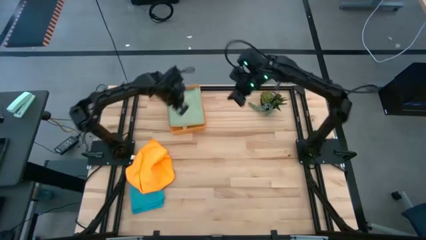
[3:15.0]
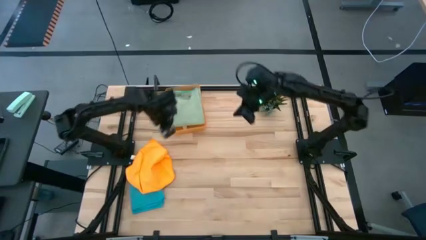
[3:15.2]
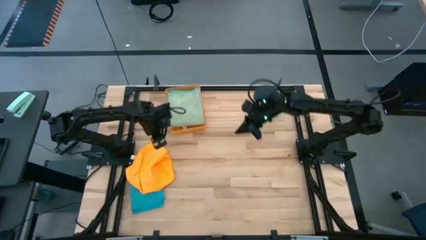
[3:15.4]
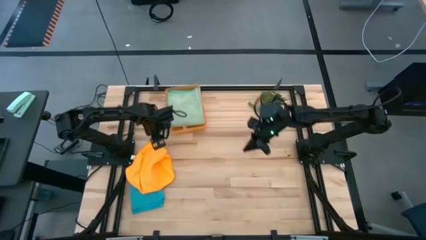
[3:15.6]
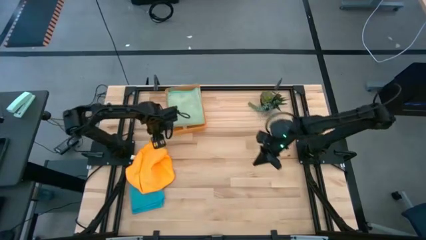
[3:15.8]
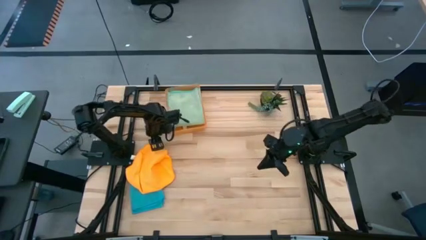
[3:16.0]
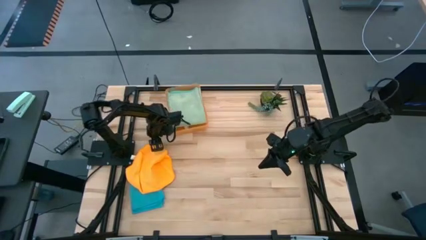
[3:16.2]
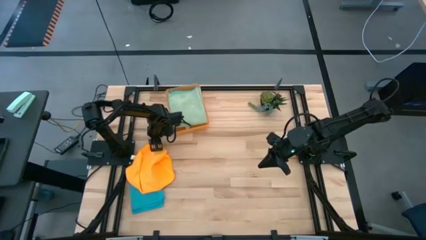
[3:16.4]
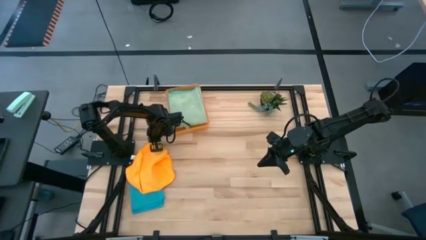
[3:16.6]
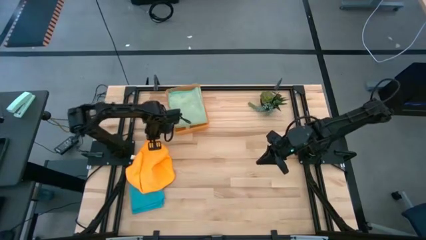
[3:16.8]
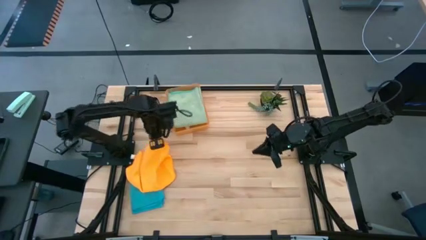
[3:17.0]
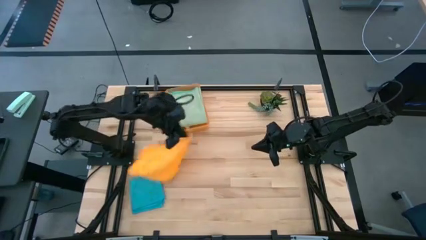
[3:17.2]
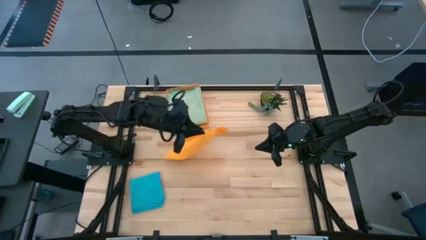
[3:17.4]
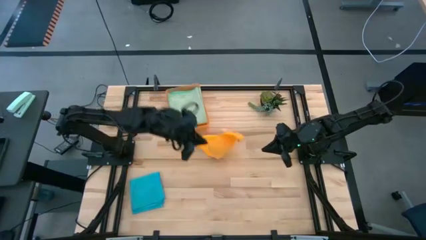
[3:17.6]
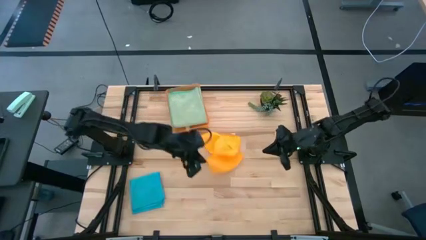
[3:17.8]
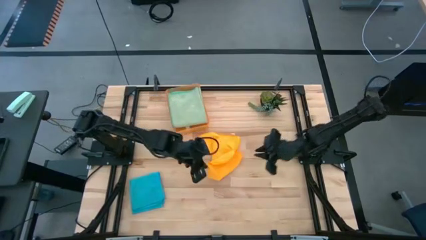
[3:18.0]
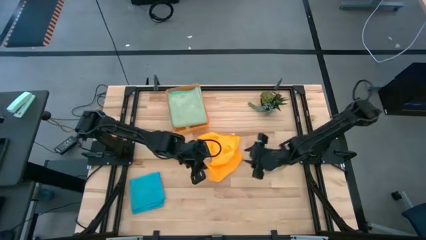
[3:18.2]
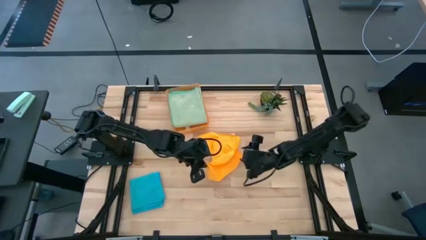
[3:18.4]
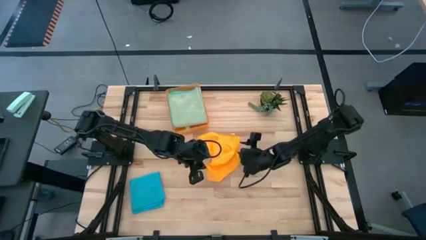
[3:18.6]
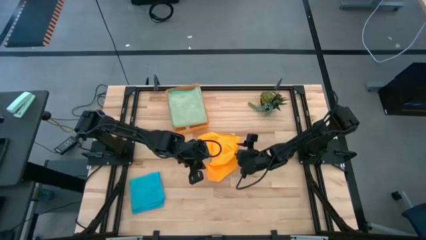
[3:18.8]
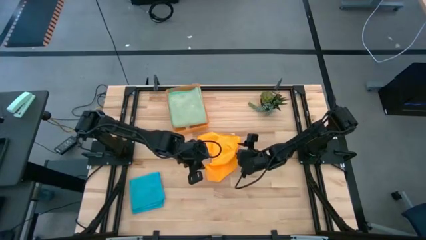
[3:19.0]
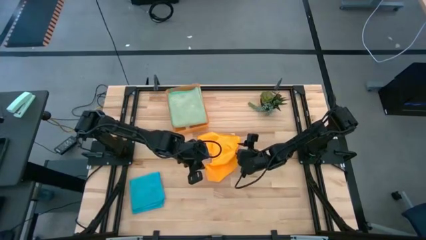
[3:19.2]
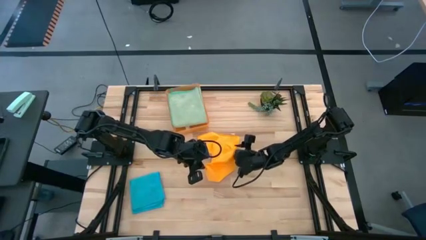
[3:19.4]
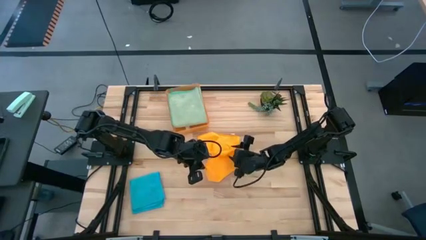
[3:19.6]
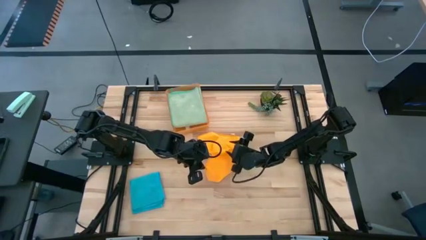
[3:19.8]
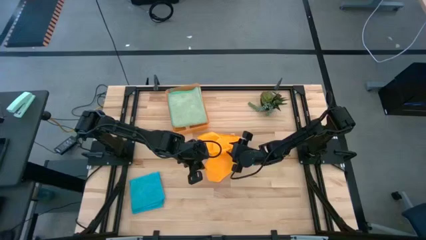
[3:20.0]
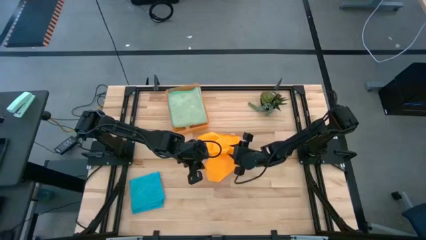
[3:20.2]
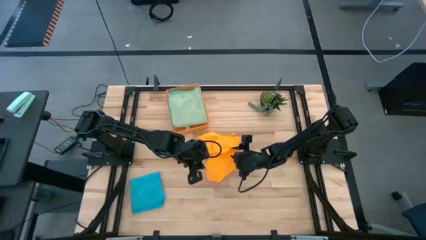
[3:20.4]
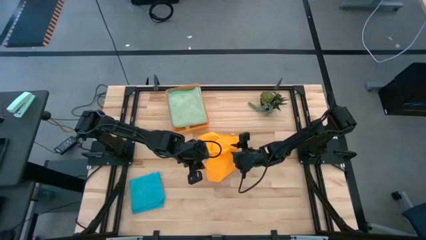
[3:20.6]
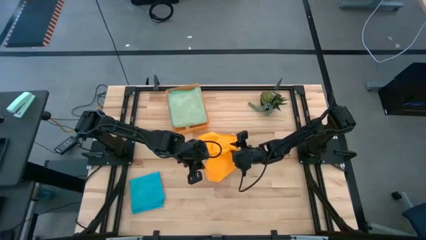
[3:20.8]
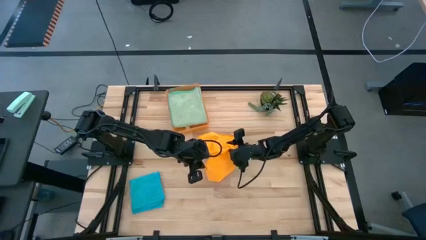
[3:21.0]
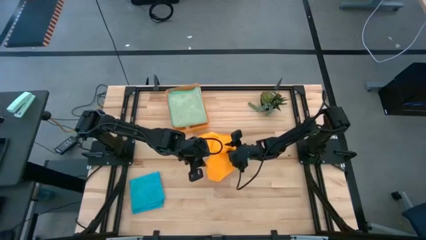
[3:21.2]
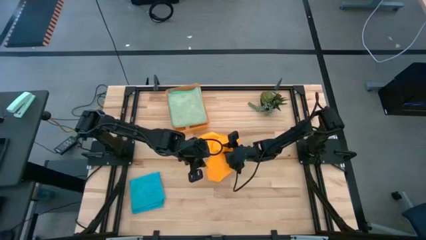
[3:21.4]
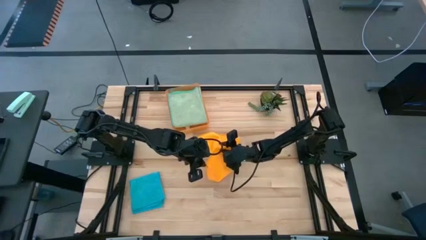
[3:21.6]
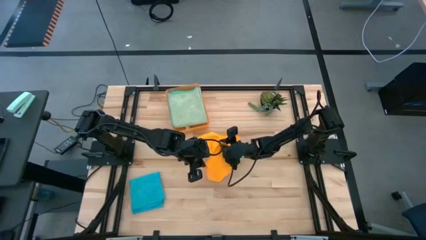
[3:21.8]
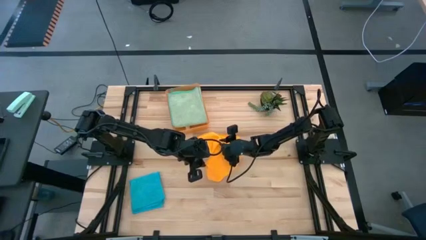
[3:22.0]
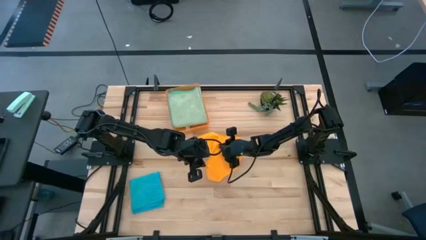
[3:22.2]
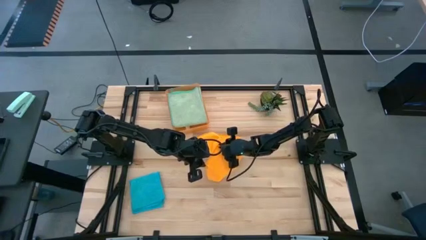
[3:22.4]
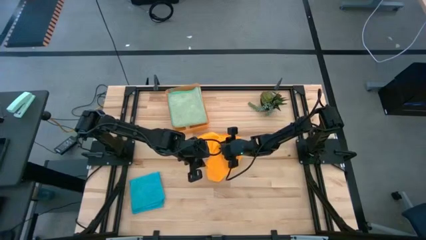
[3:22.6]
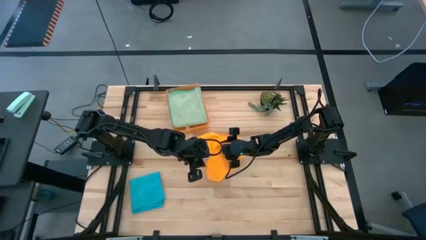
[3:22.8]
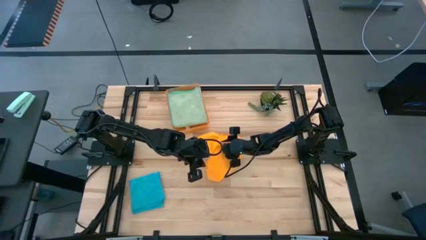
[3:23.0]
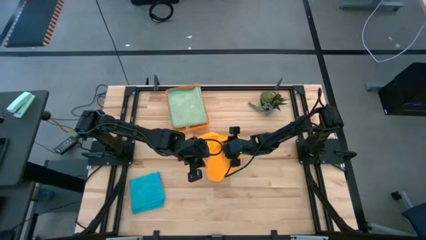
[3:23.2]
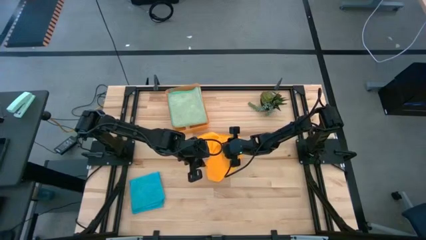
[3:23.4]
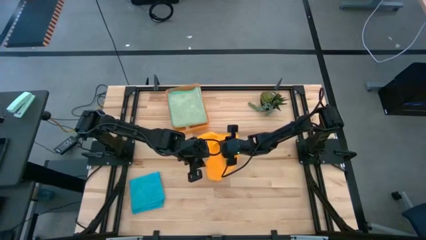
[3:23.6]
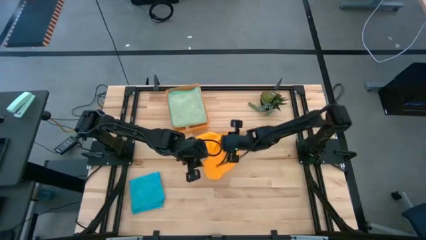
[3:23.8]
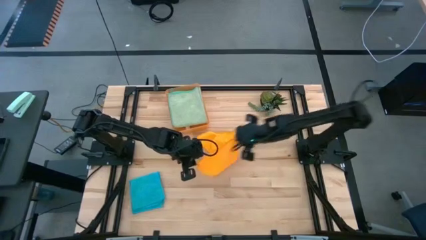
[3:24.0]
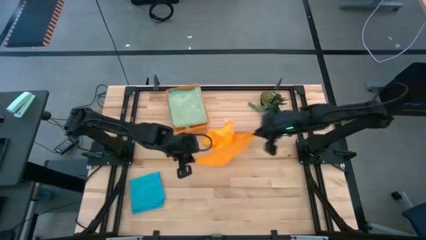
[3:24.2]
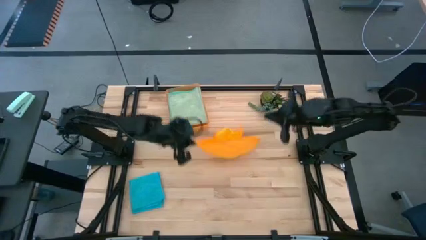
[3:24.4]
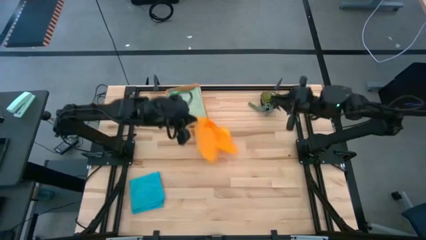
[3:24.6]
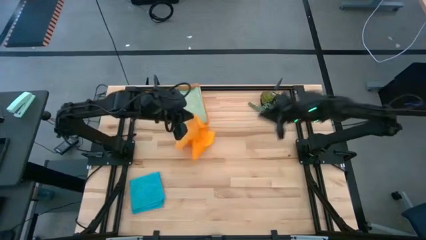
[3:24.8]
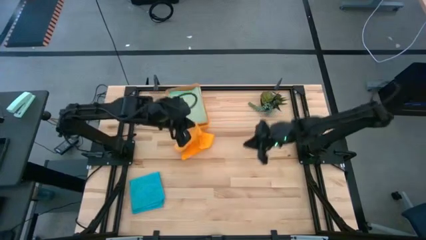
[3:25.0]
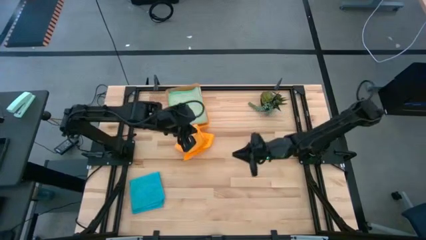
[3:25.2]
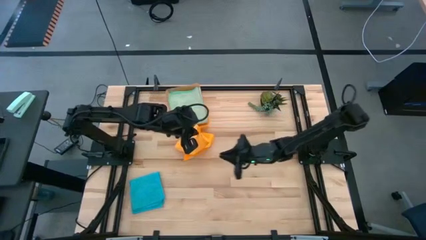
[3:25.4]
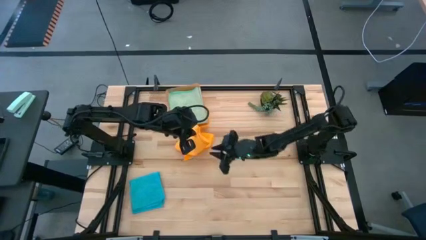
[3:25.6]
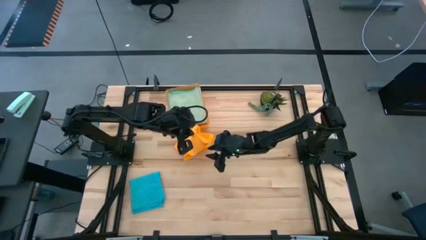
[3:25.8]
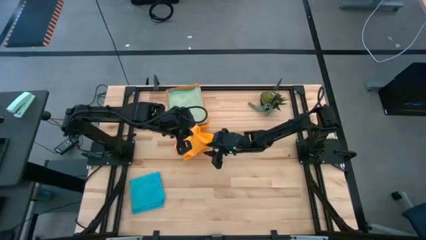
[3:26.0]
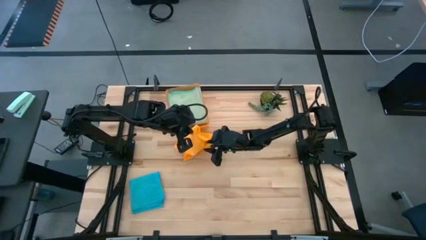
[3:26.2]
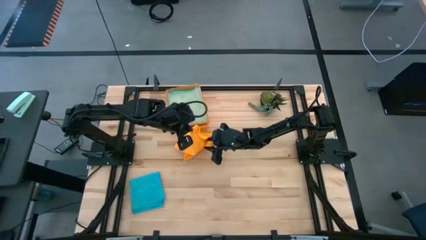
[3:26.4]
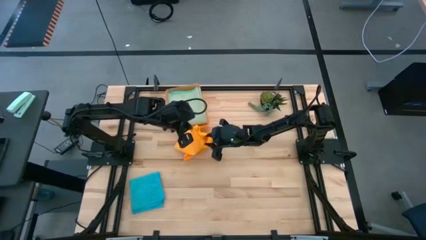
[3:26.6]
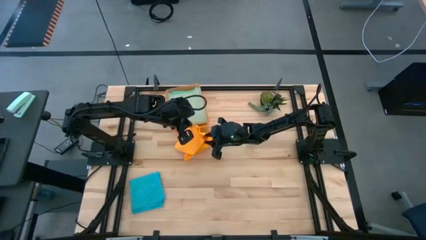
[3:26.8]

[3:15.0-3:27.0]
Task: Fold microfiber towels
Fold the orange microfiber cloth
